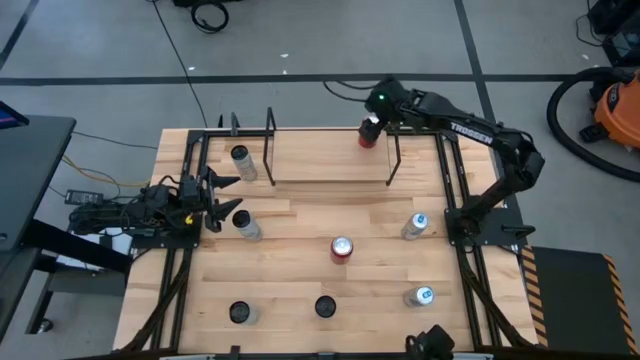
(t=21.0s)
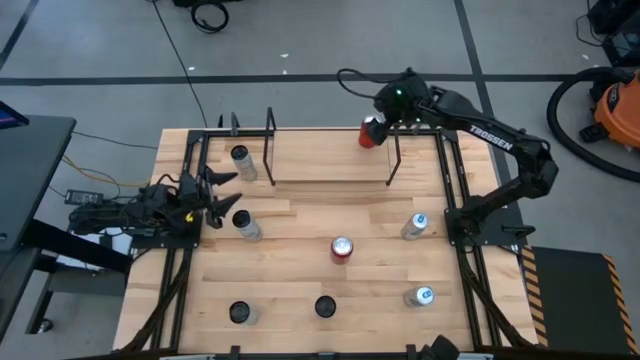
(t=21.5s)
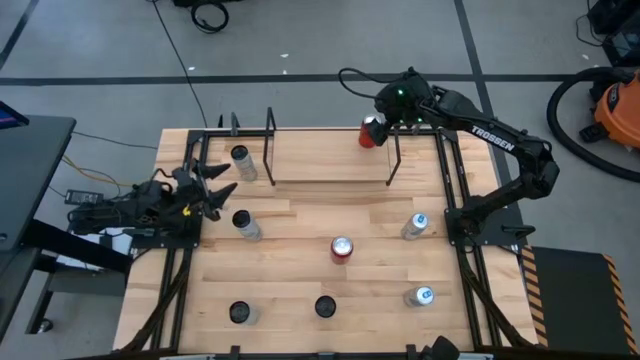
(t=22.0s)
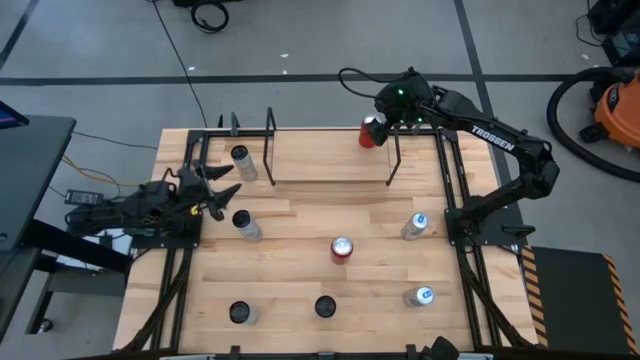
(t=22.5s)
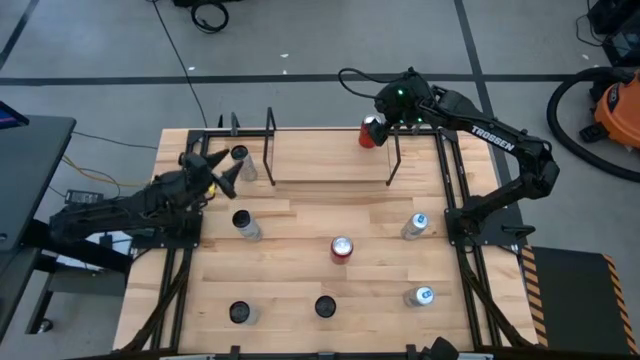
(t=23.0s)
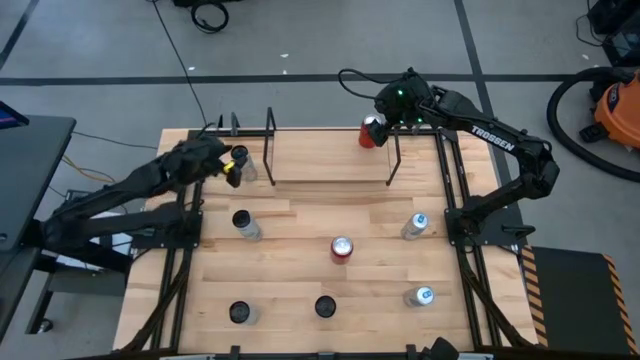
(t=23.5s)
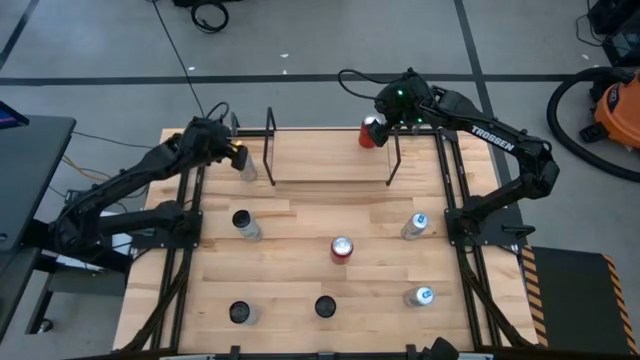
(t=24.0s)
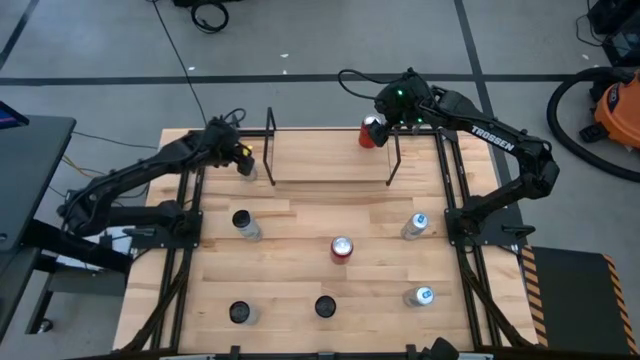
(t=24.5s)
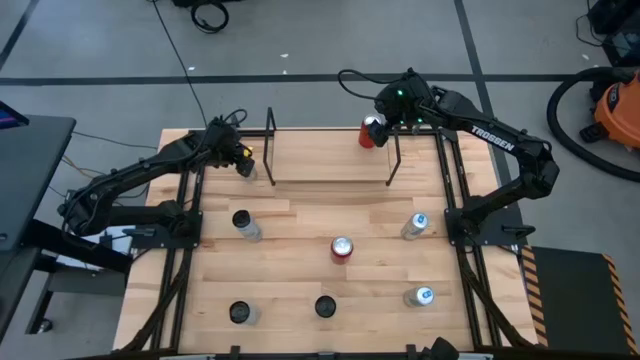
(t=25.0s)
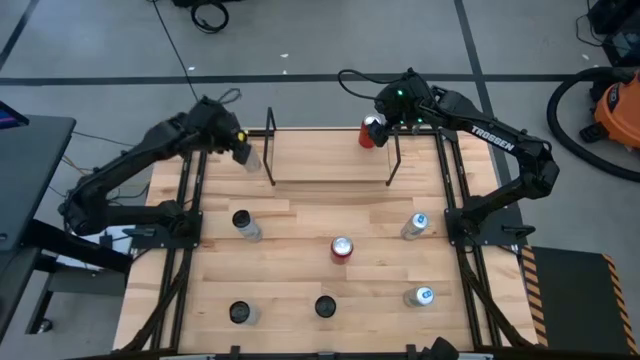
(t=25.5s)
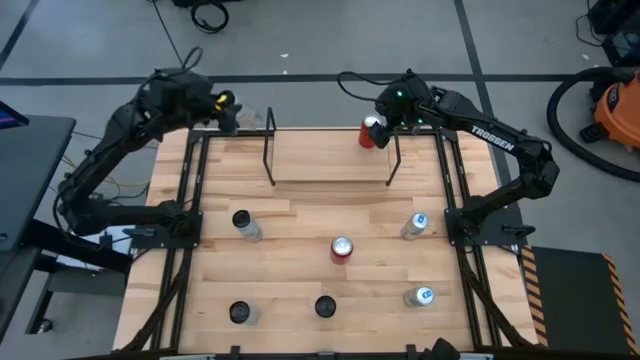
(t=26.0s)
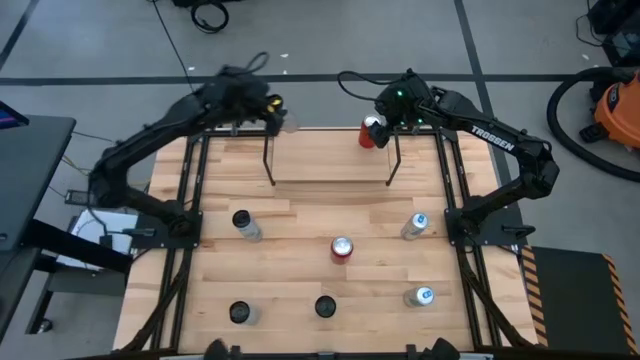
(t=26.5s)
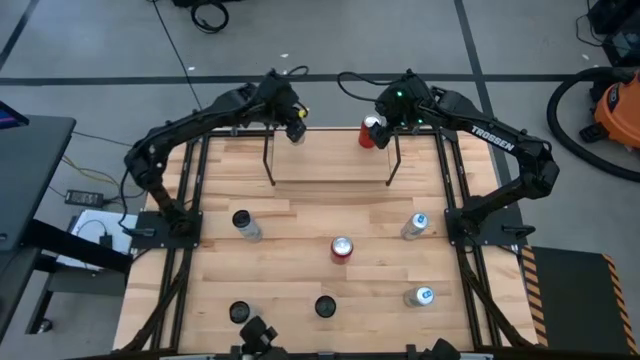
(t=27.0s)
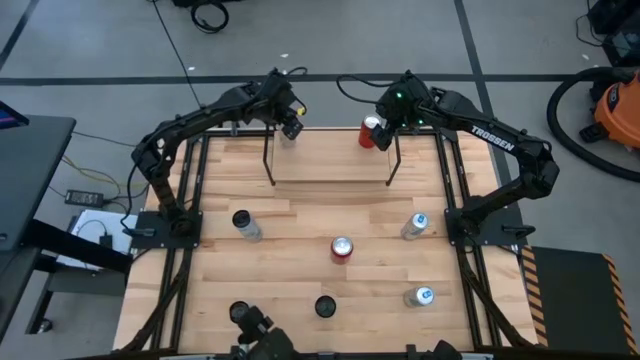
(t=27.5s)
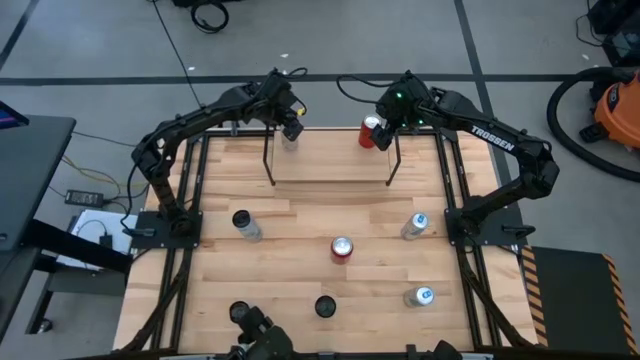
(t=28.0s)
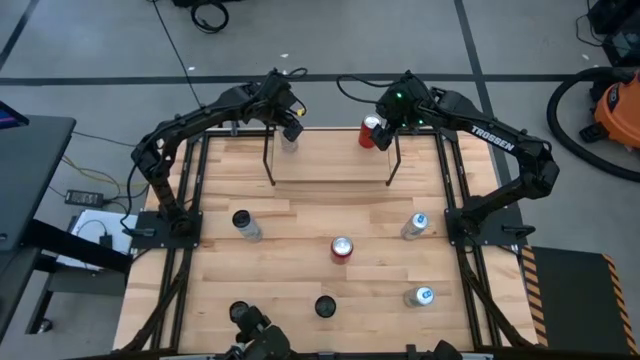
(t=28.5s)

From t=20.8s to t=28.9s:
Task: Place canned beverage on shelf
Put the top white yellow soda can on the shelf

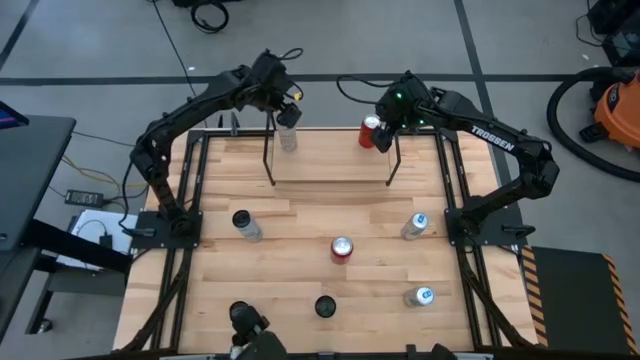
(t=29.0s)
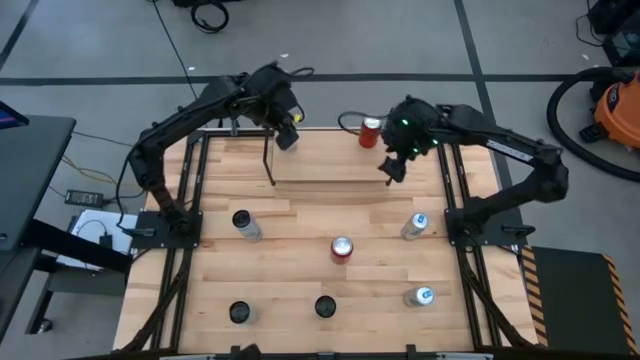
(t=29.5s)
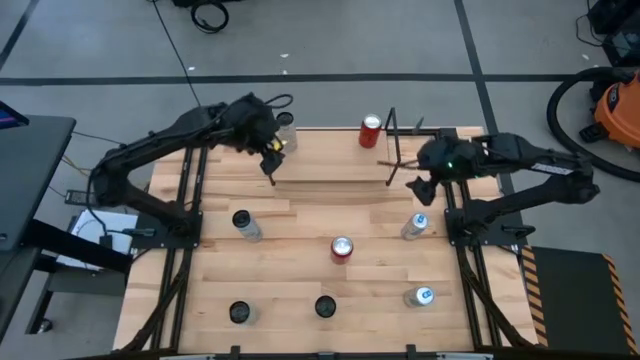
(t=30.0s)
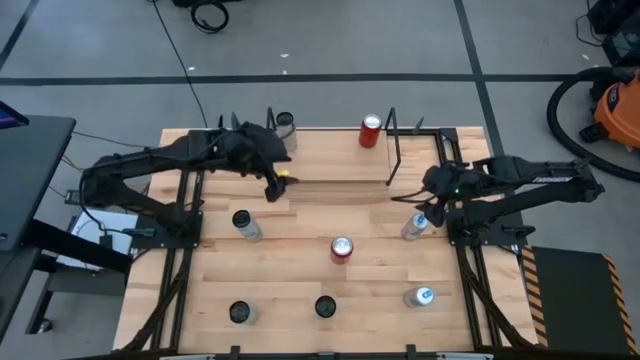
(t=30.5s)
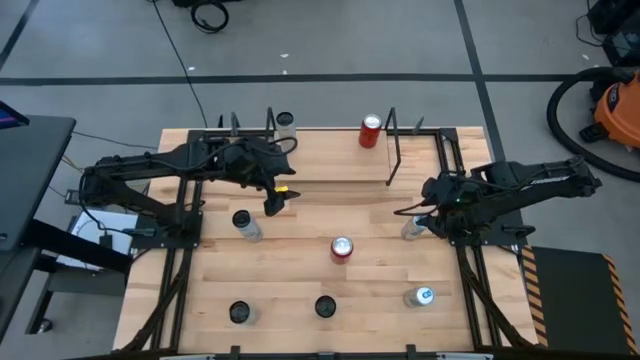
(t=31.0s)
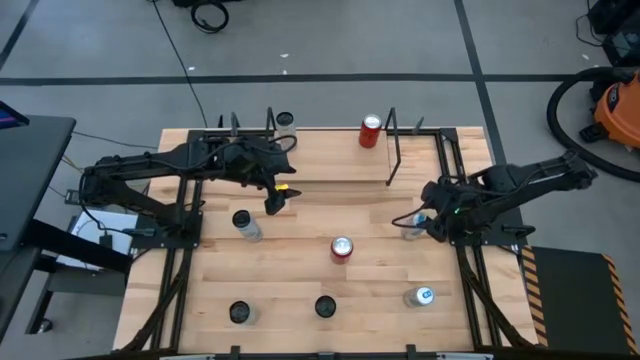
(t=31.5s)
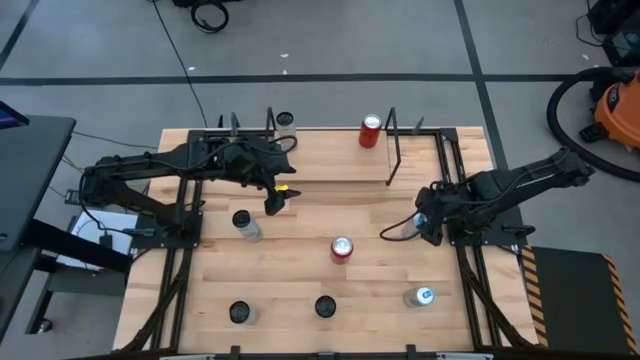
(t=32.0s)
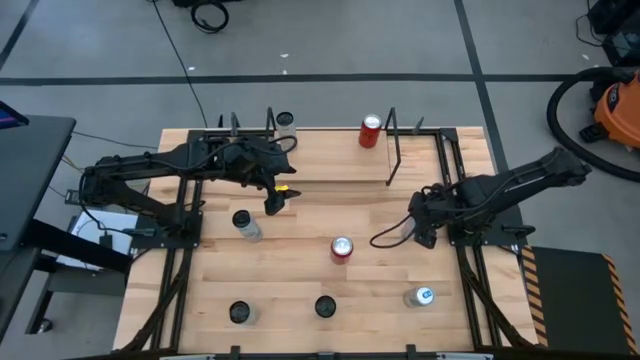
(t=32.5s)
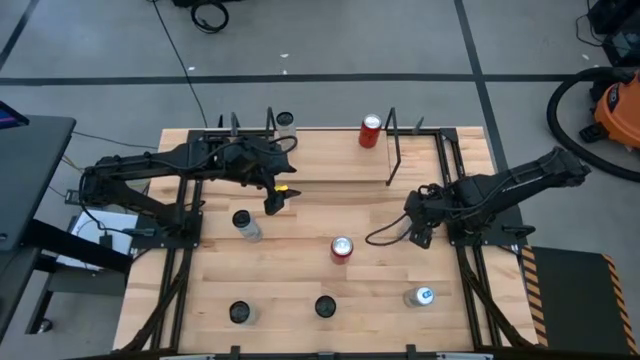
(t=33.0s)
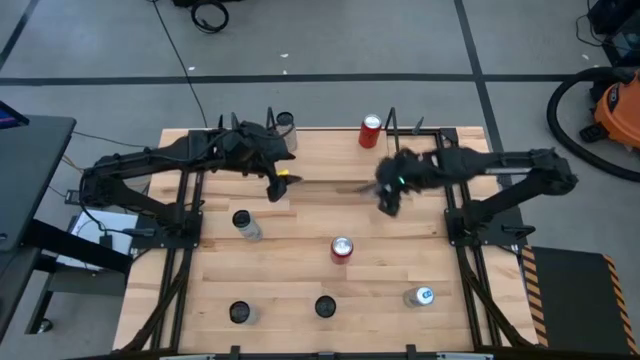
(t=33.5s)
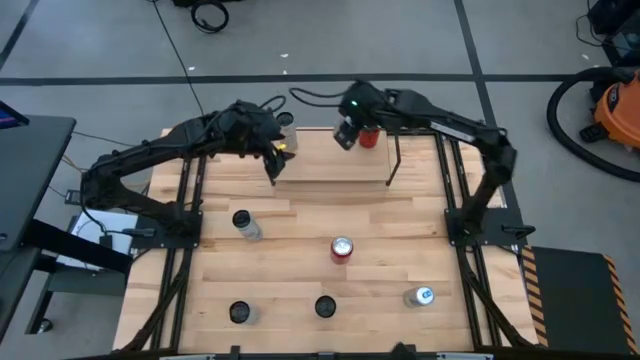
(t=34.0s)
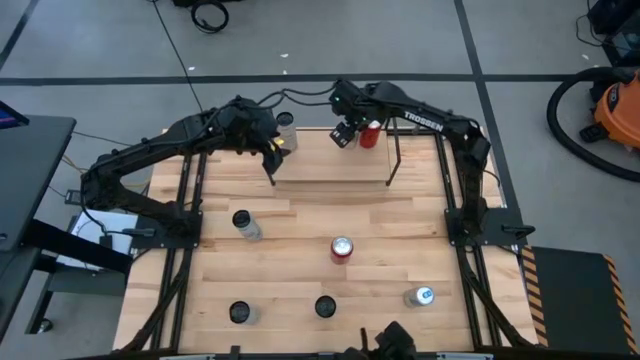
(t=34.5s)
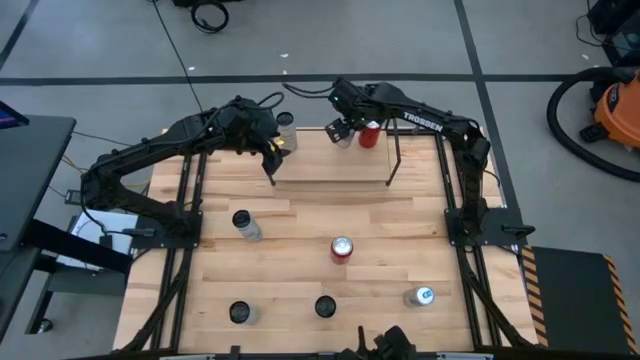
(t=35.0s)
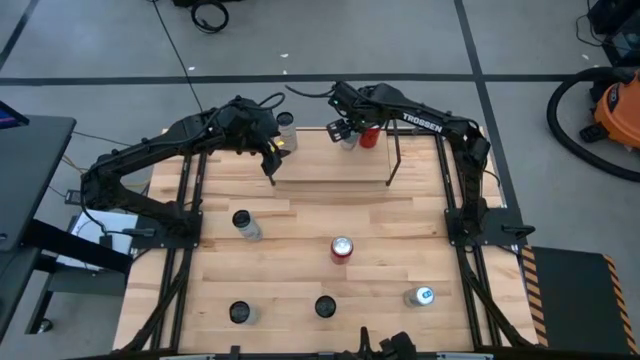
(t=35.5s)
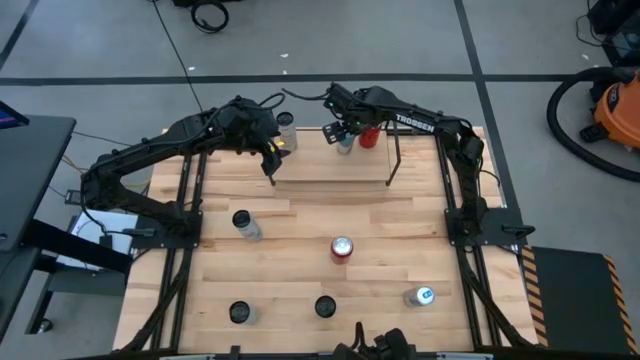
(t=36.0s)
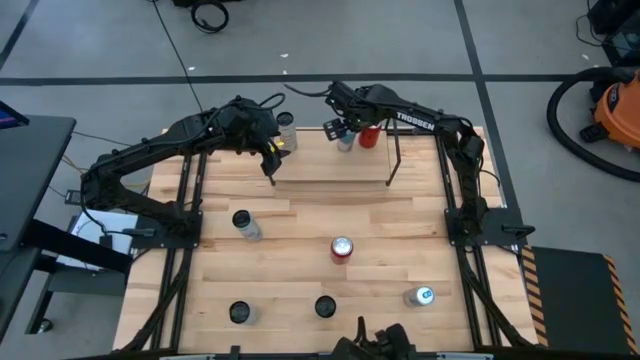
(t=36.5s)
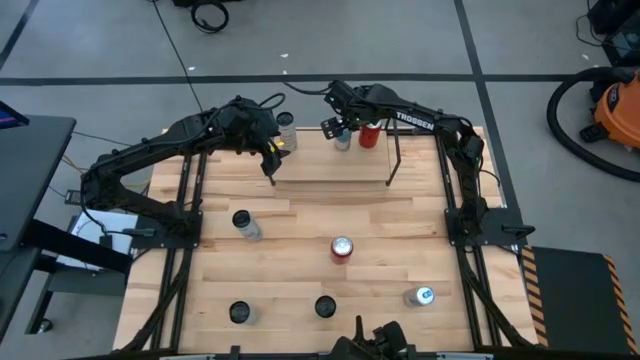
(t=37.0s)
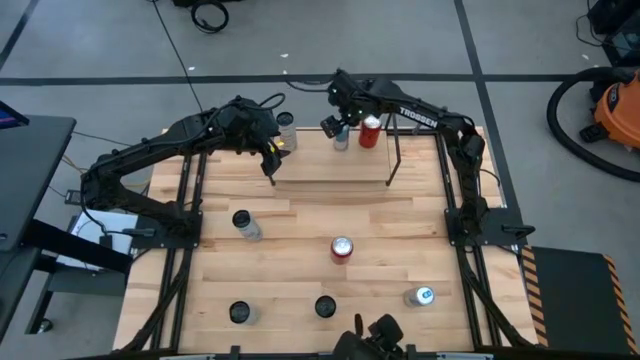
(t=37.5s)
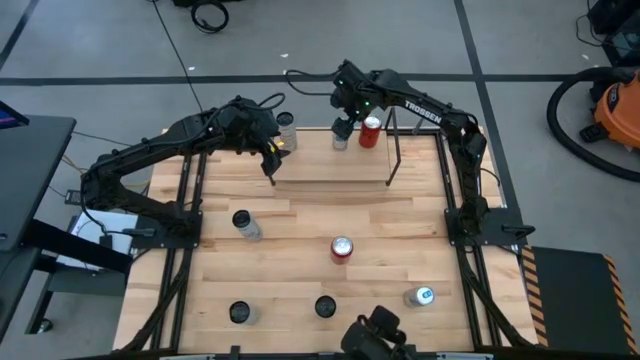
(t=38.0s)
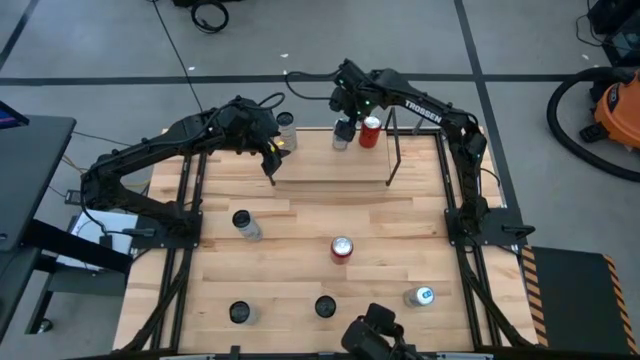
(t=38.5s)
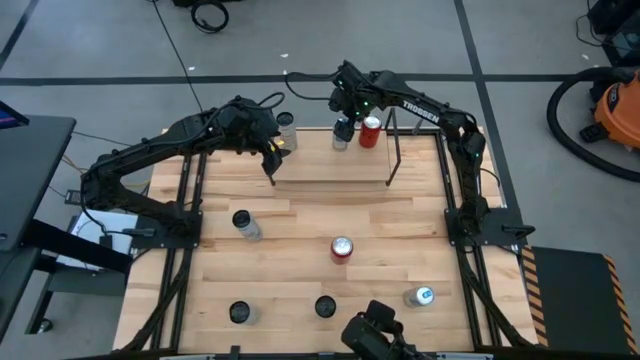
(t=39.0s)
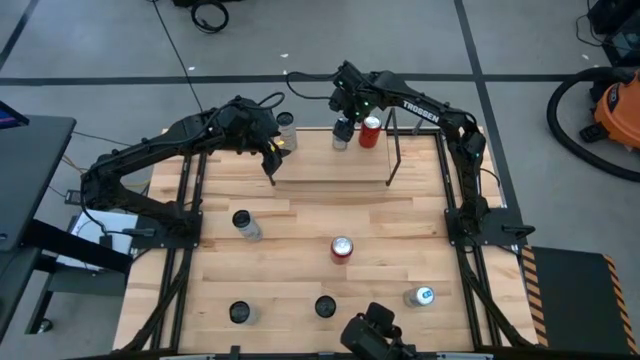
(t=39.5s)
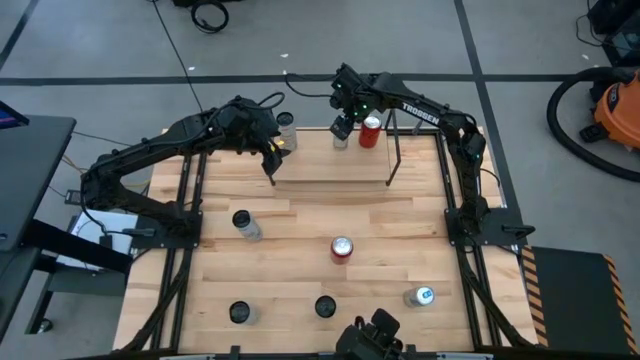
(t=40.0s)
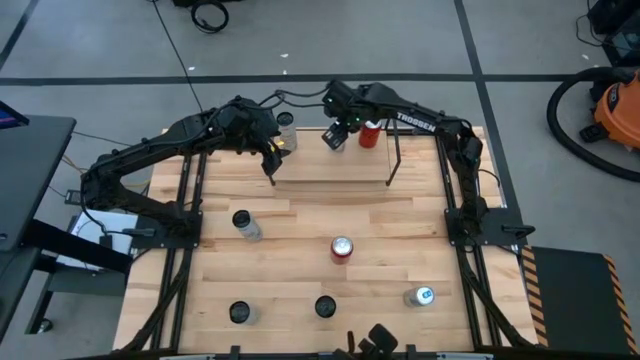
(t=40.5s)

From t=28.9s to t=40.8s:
Put the top blue soda can on the shelf

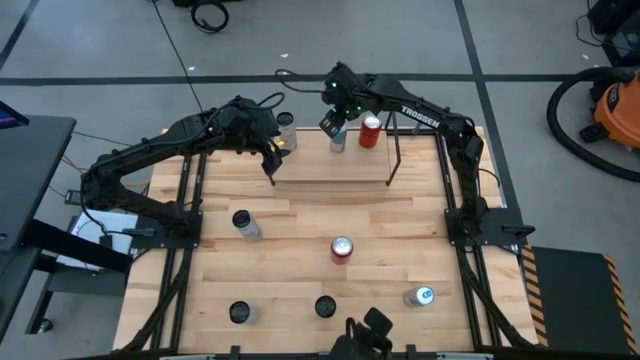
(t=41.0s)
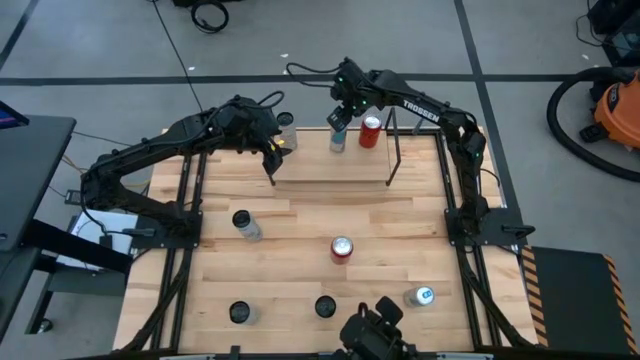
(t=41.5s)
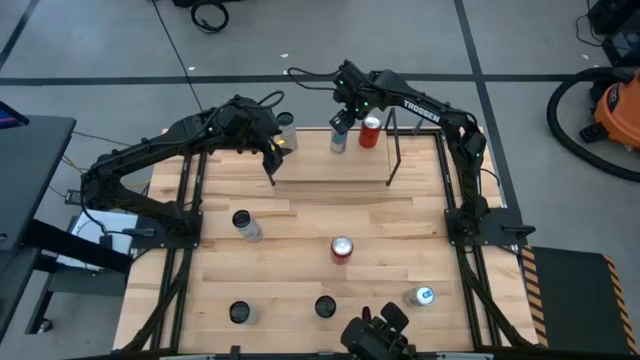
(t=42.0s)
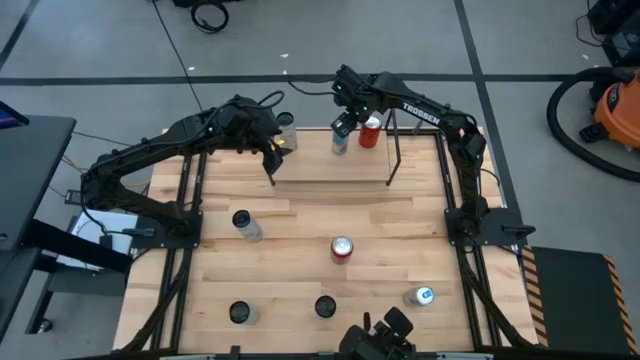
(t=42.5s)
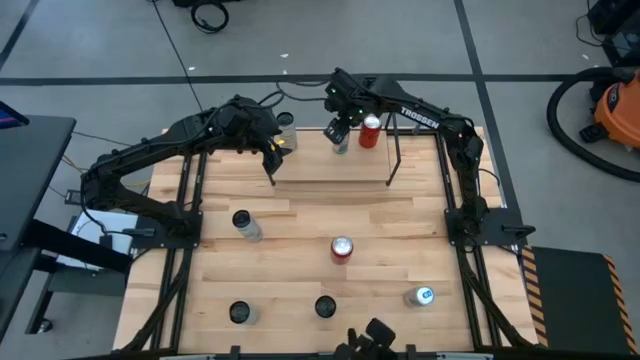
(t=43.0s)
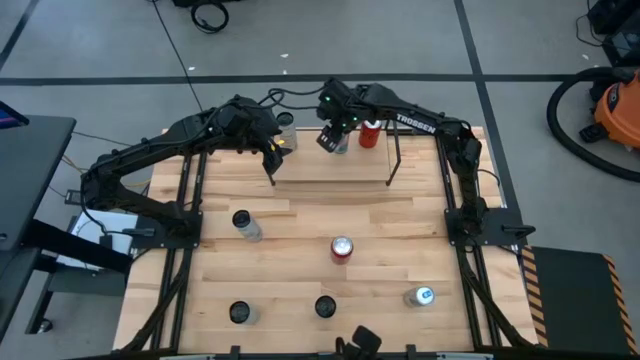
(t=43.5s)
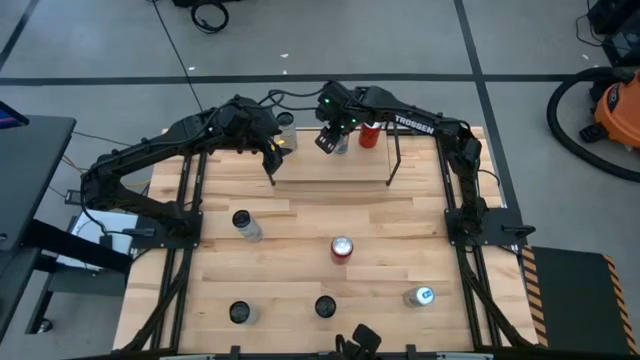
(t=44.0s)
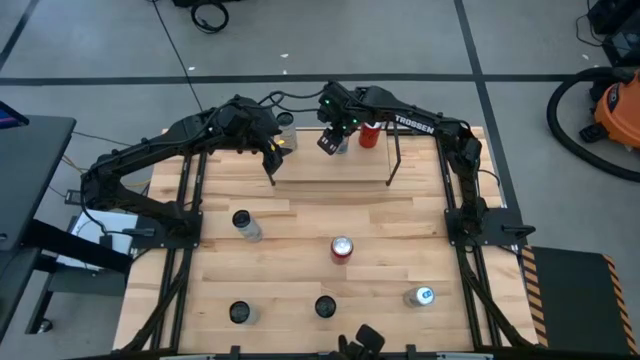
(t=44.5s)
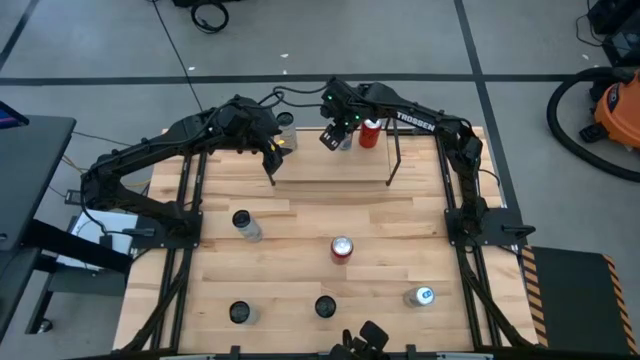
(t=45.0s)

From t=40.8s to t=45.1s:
Put the top blue soda can on the shelf
